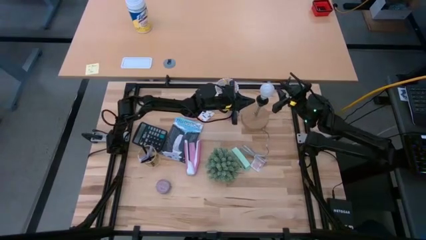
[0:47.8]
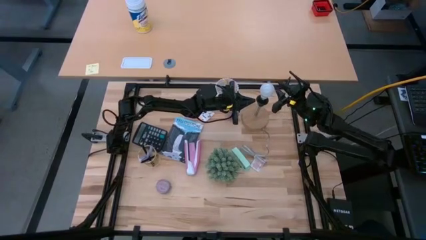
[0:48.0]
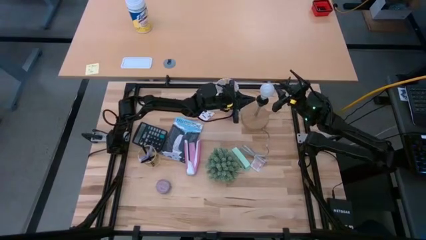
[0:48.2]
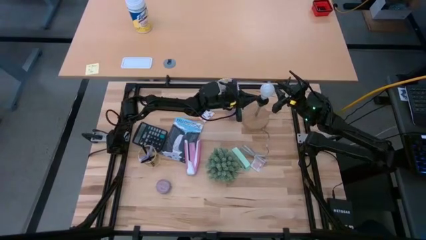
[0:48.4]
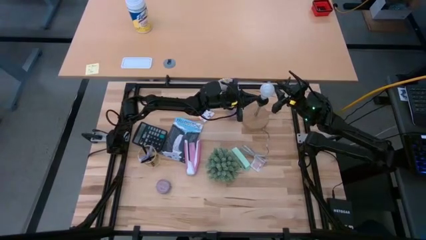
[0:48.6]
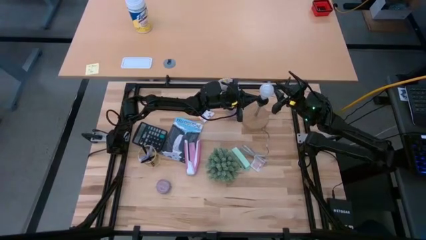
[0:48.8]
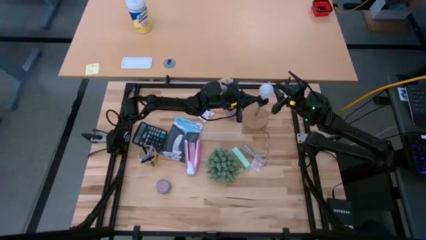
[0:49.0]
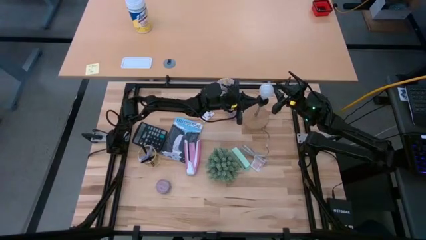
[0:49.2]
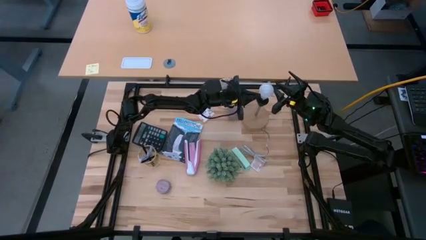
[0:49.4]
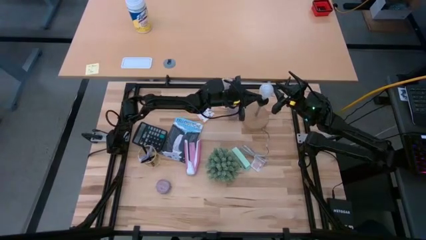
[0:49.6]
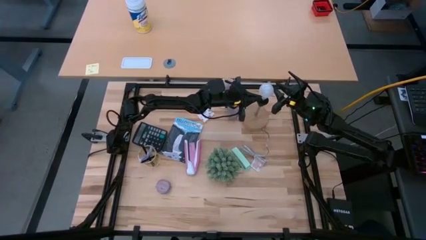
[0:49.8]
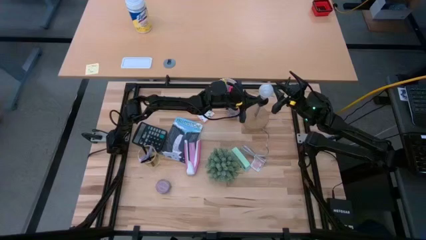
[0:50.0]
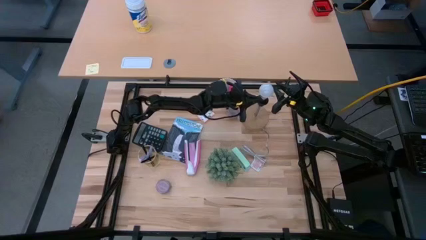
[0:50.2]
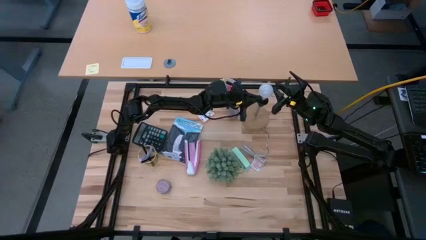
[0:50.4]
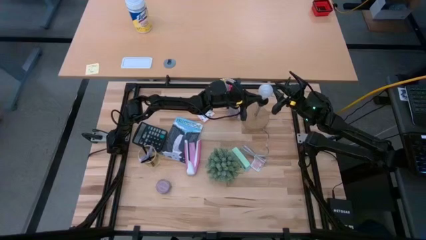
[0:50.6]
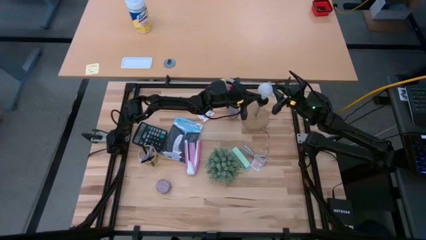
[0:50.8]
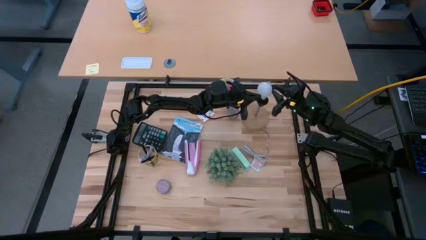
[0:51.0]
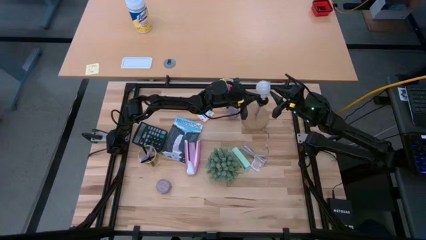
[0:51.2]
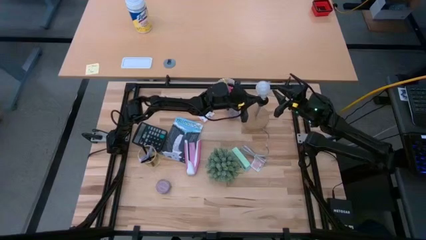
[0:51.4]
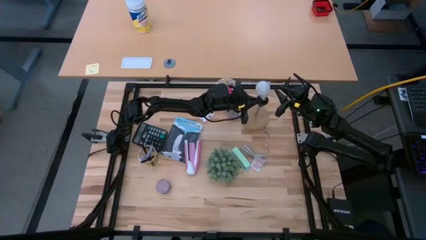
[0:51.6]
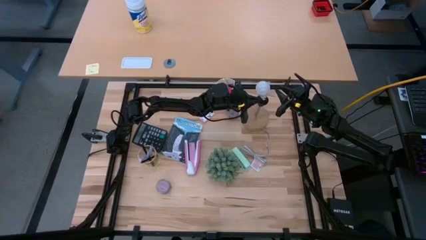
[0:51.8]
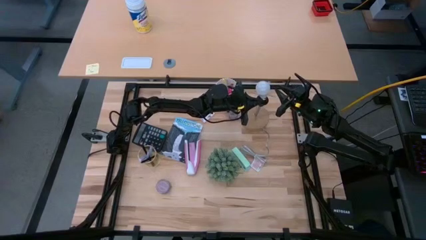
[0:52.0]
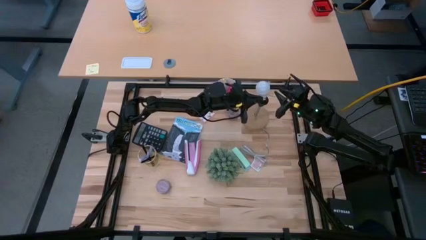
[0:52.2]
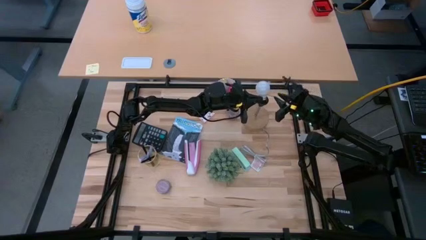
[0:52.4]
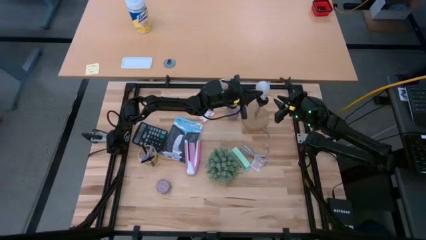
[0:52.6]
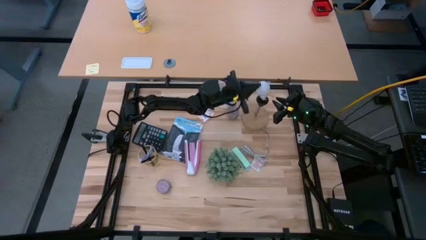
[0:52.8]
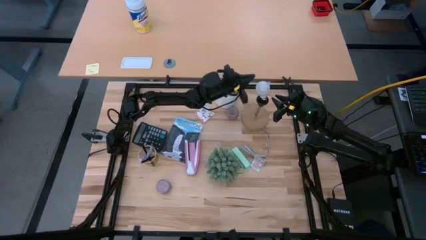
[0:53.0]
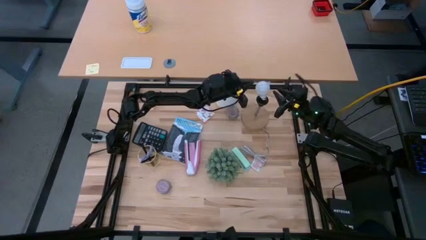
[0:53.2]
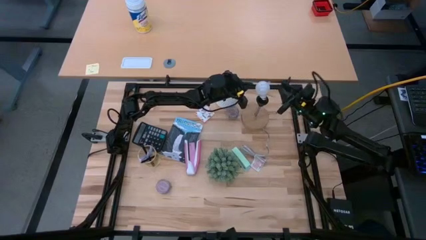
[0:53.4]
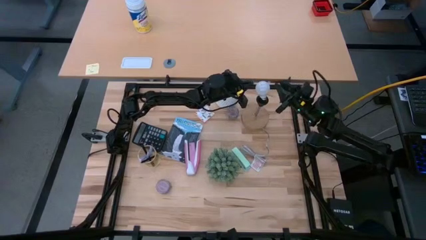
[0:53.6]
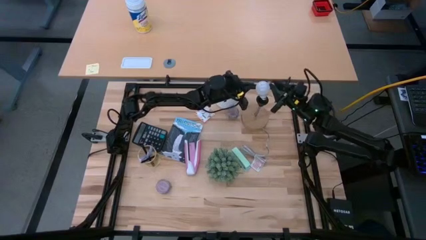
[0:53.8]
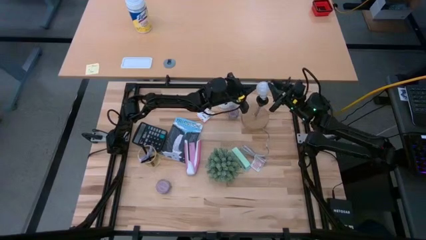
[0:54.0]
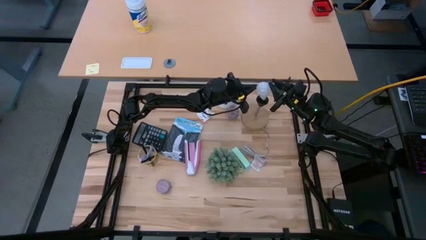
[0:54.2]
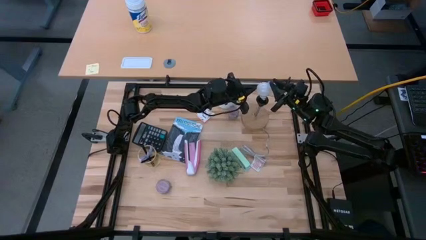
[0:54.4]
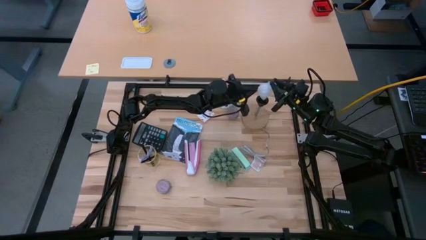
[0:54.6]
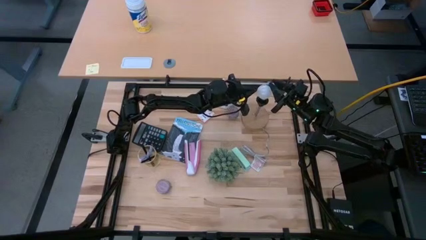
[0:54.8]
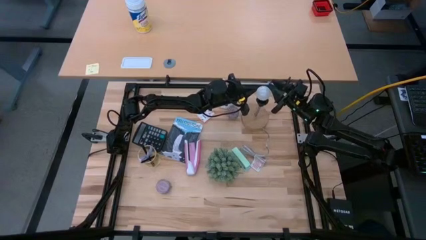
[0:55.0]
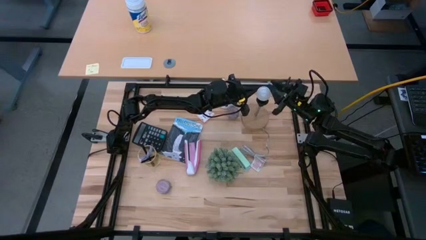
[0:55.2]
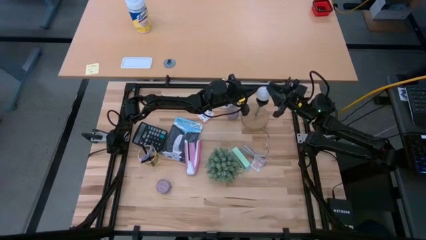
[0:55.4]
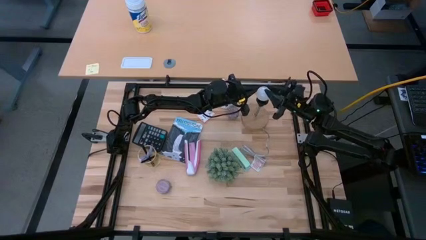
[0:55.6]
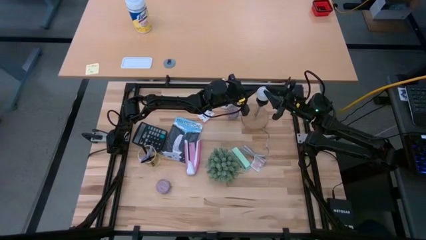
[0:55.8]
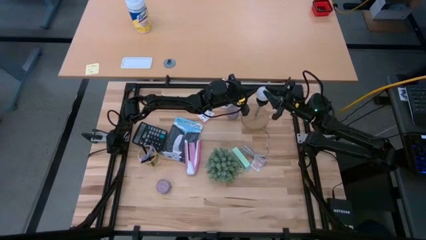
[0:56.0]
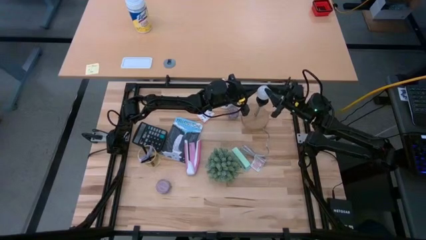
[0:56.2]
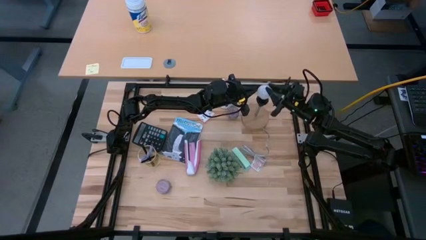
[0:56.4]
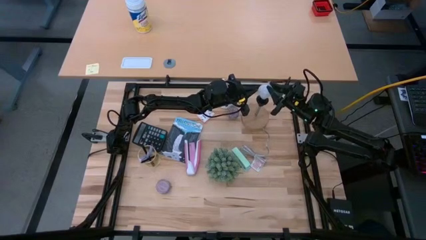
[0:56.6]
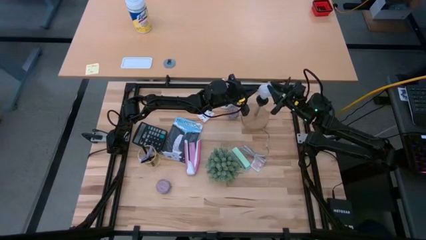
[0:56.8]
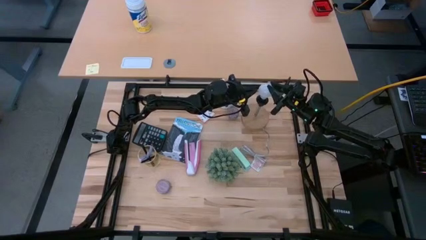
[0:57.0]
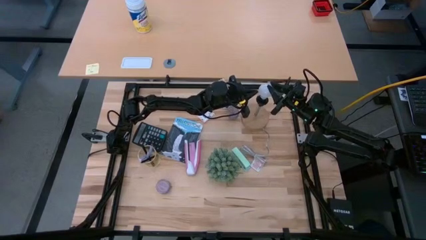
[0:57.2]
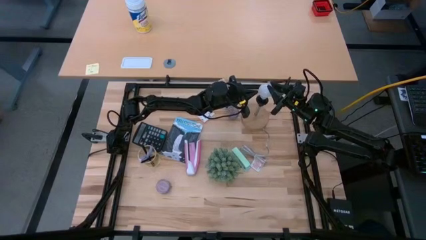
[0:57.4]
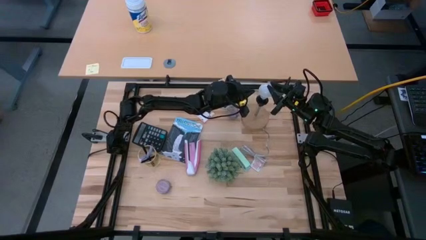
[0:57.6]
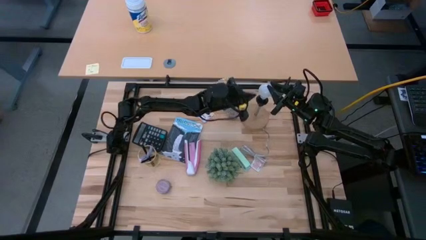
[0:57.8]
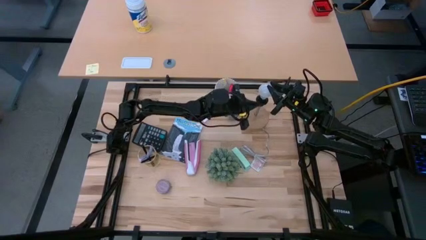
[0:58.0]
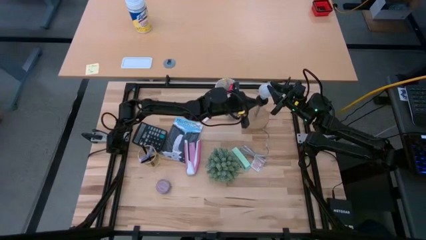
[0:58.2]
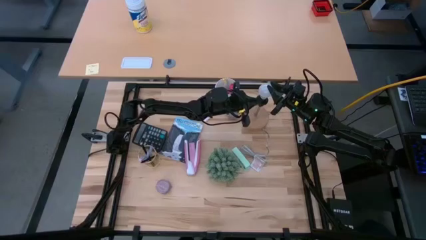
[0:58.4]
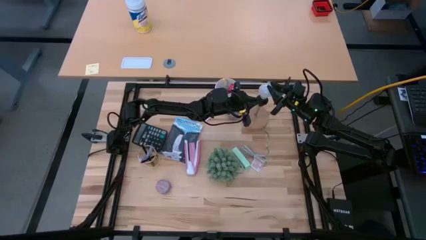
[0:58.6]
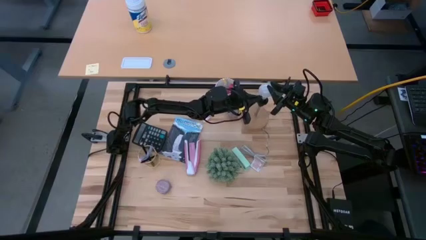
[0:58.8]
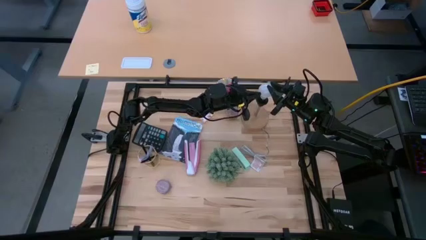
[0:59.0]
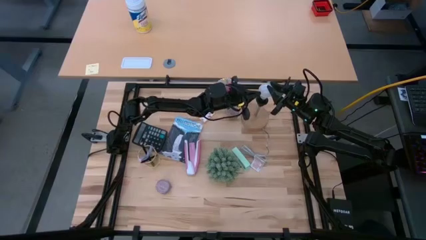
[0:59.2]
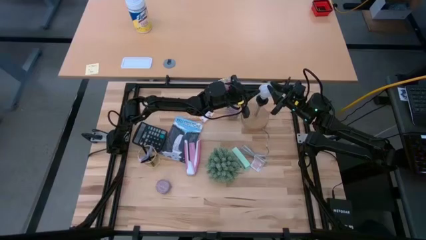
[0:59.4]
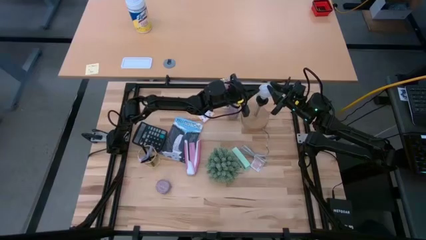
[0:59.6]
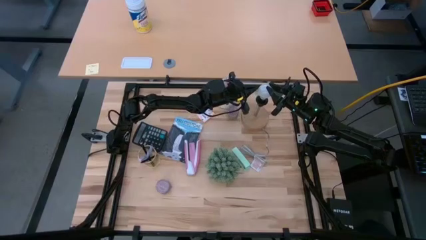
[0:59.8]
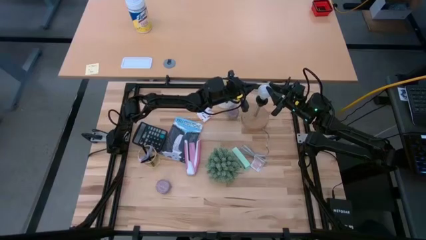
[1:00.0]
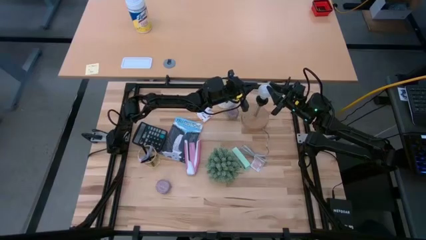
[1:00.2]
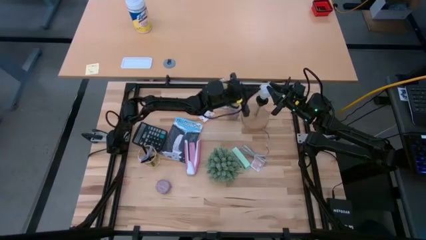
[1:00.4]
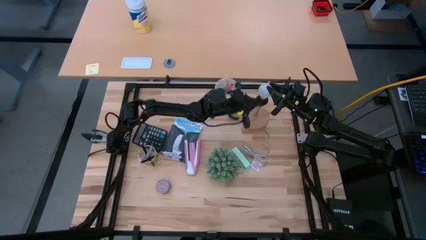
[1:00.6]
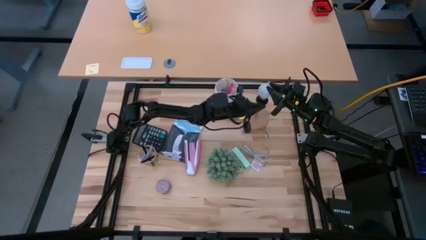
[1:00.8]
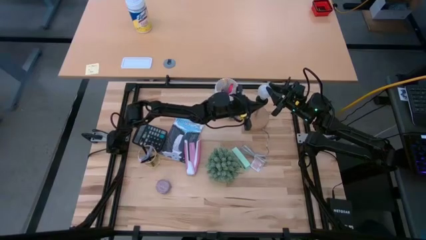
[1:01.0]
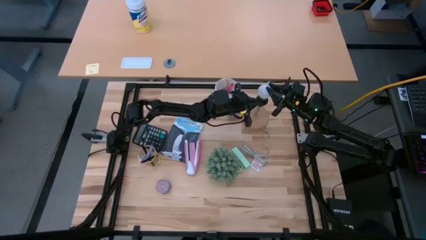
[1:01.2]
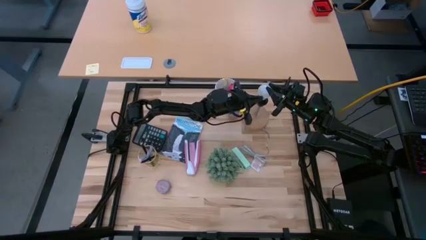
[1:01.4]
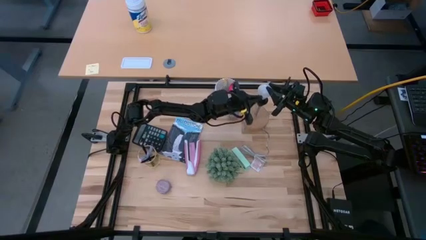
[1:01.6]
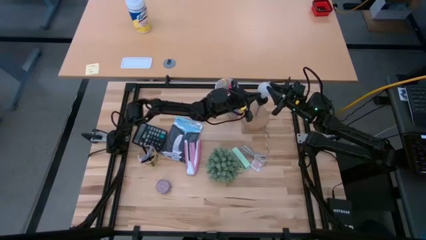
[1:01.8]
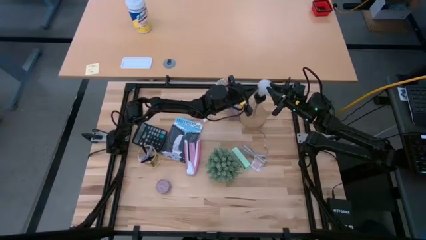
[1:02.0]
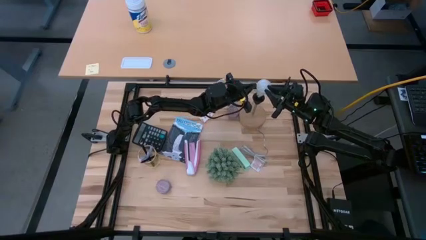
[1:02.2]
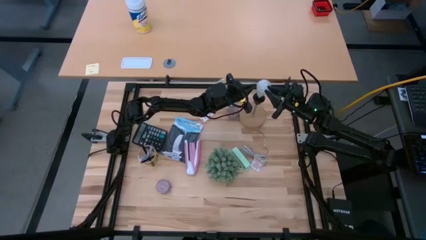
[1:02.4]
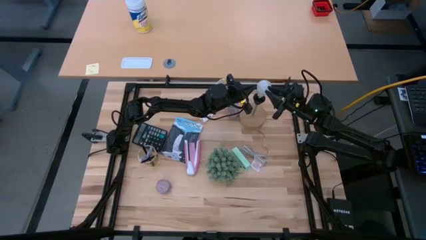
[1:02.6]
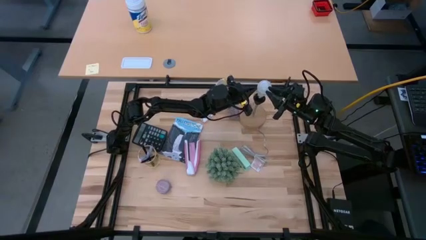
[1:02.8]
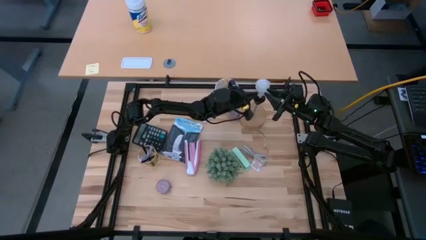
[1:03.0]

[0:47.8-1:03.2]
Task: Screw lightbulb
Insert the lightbulb into the lamp
